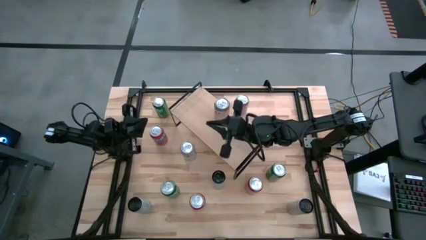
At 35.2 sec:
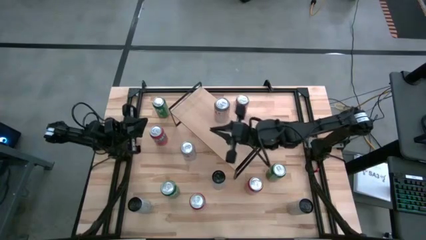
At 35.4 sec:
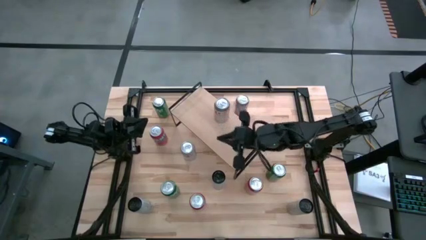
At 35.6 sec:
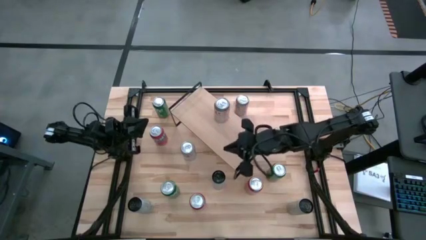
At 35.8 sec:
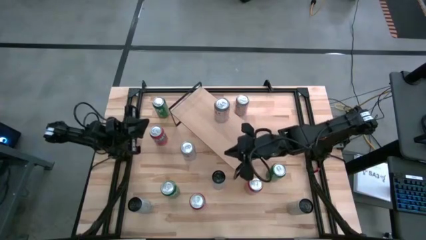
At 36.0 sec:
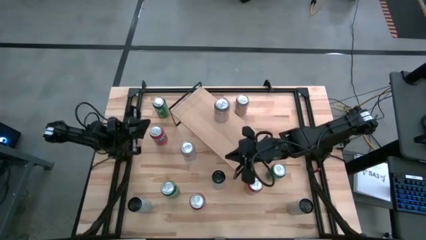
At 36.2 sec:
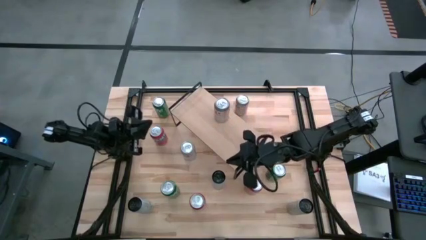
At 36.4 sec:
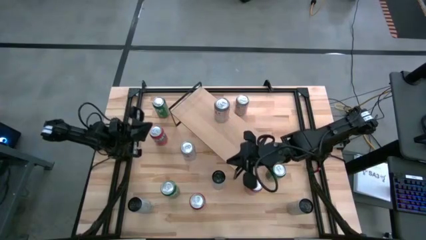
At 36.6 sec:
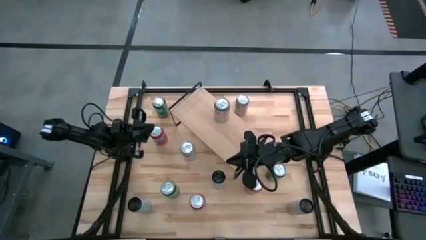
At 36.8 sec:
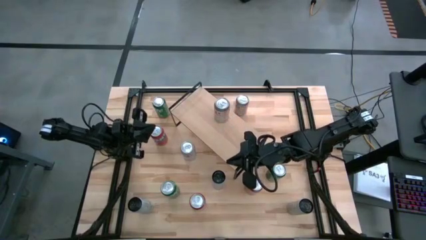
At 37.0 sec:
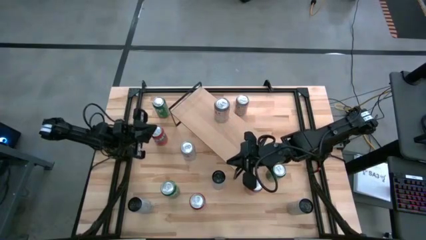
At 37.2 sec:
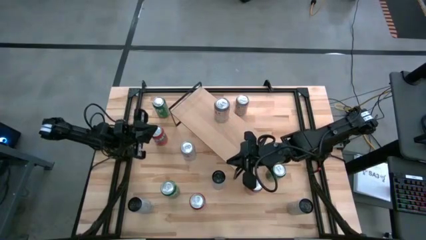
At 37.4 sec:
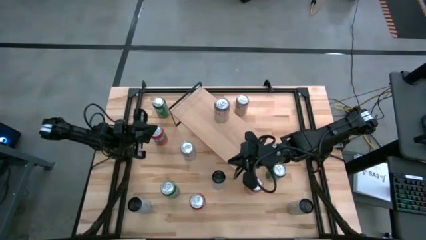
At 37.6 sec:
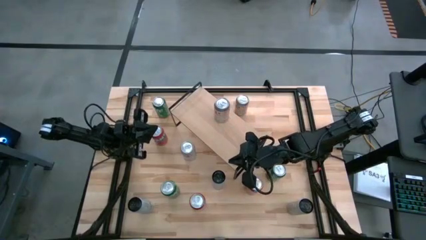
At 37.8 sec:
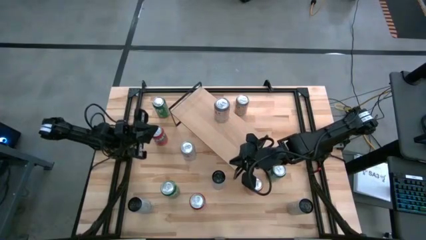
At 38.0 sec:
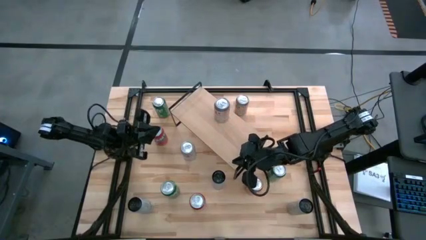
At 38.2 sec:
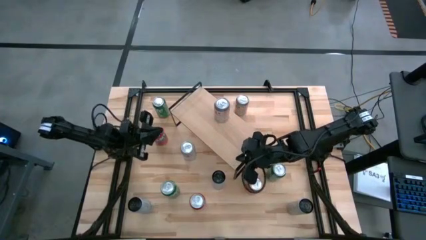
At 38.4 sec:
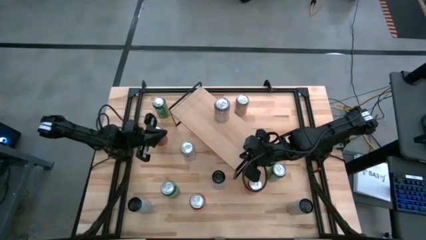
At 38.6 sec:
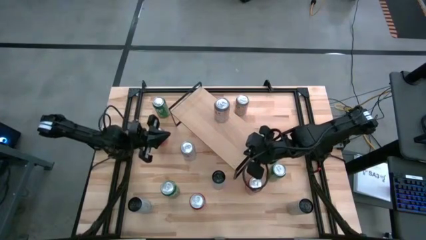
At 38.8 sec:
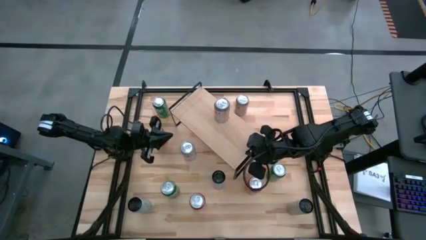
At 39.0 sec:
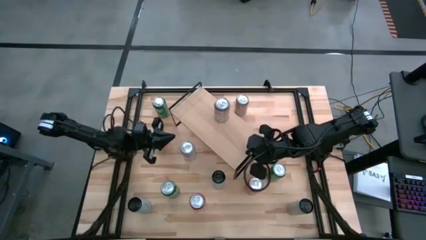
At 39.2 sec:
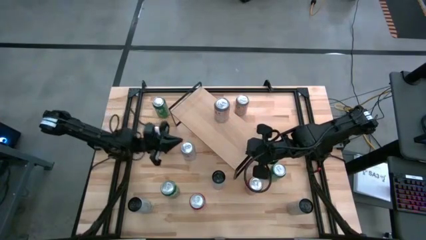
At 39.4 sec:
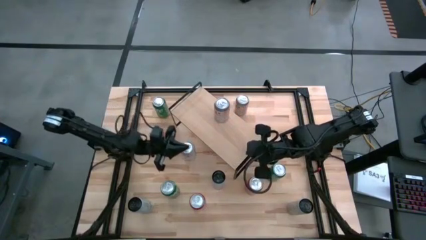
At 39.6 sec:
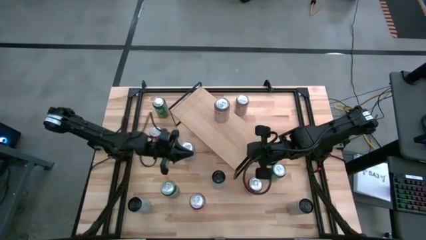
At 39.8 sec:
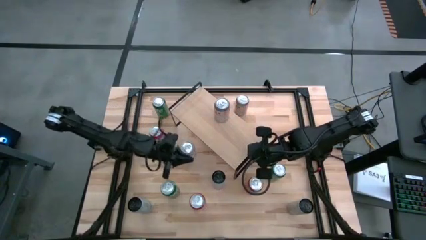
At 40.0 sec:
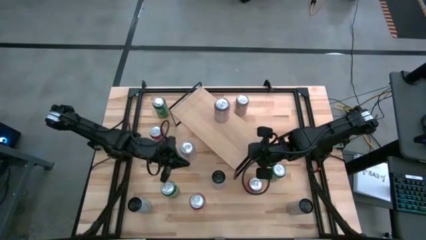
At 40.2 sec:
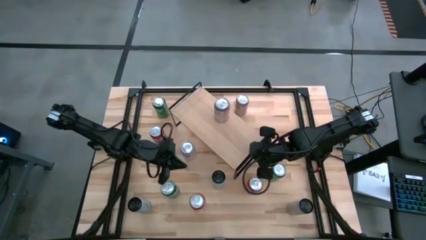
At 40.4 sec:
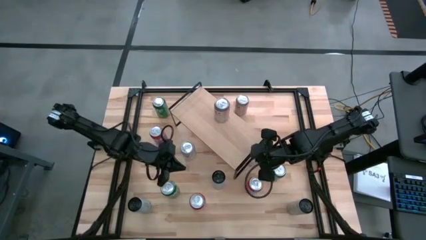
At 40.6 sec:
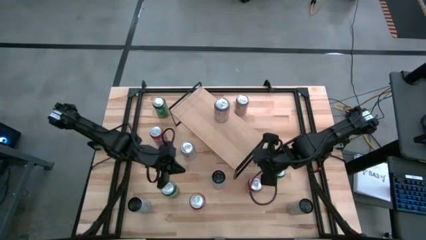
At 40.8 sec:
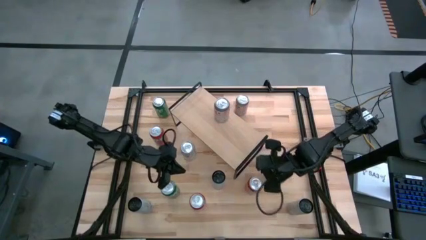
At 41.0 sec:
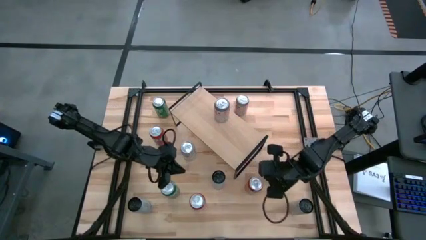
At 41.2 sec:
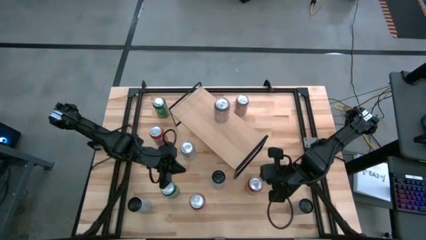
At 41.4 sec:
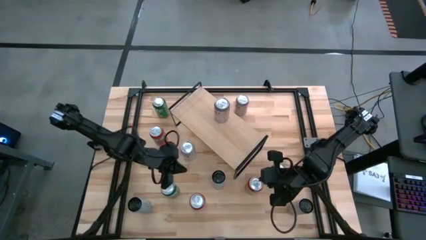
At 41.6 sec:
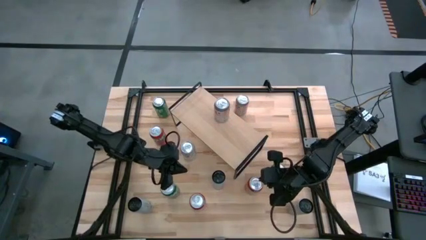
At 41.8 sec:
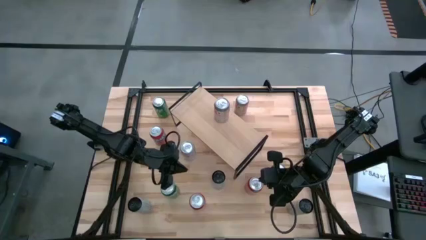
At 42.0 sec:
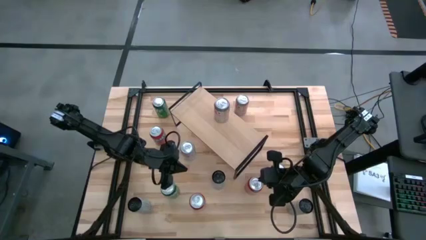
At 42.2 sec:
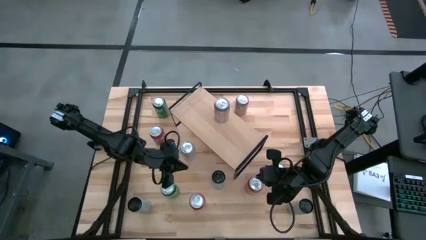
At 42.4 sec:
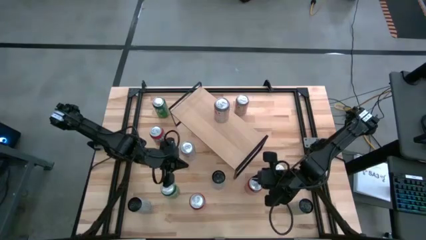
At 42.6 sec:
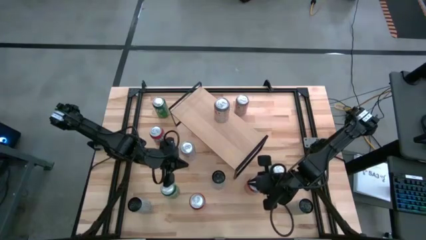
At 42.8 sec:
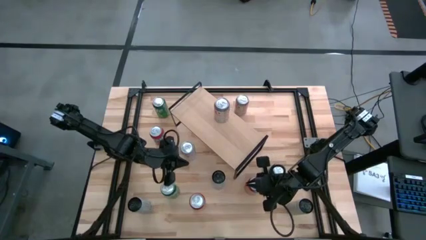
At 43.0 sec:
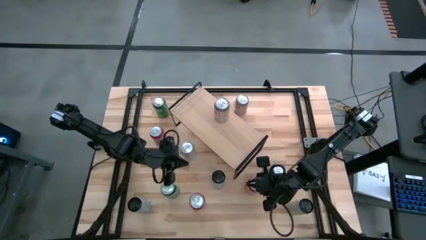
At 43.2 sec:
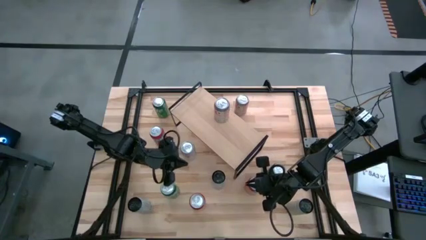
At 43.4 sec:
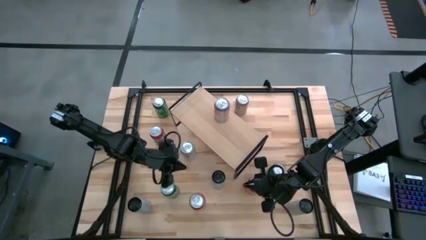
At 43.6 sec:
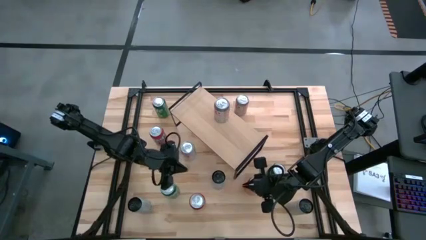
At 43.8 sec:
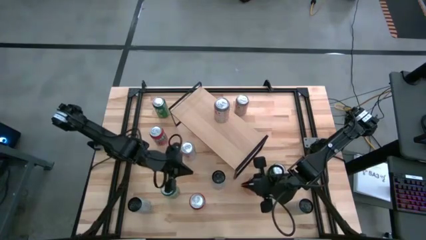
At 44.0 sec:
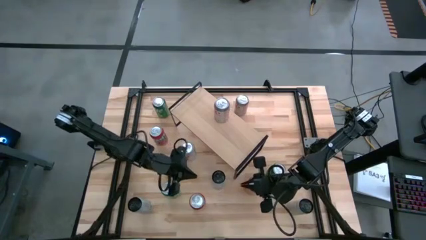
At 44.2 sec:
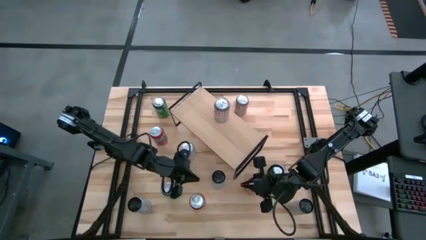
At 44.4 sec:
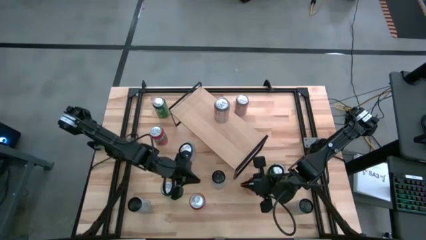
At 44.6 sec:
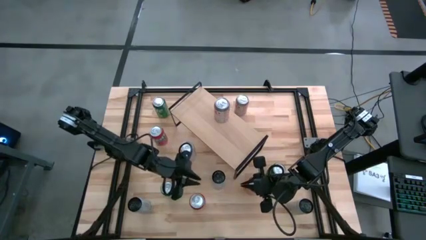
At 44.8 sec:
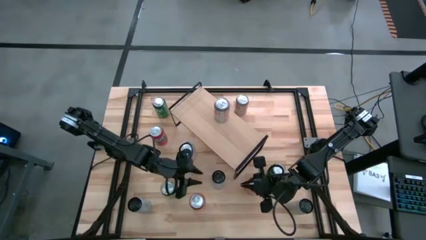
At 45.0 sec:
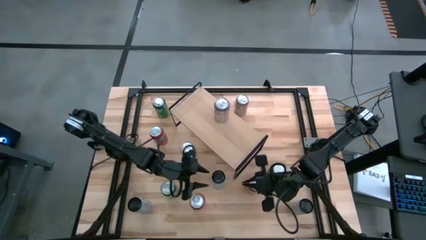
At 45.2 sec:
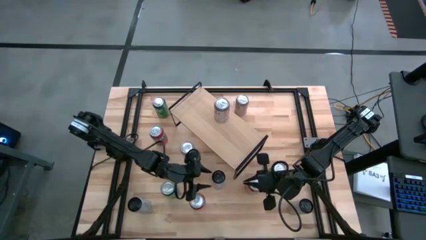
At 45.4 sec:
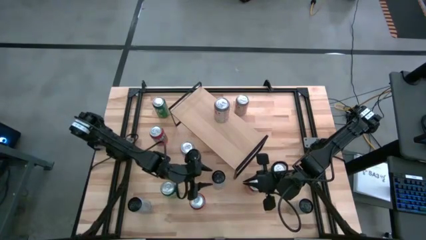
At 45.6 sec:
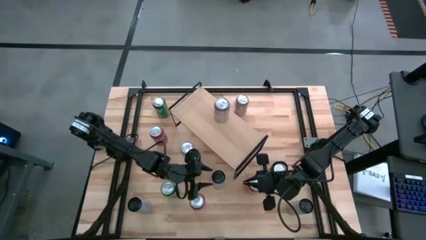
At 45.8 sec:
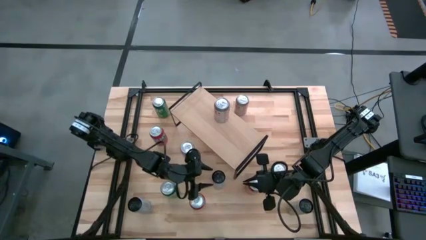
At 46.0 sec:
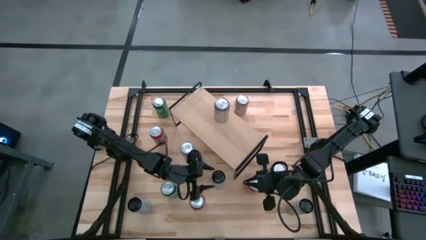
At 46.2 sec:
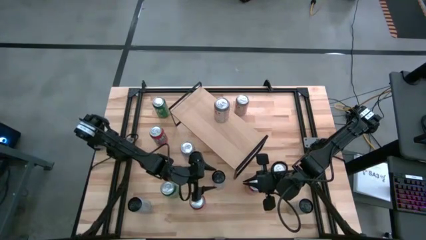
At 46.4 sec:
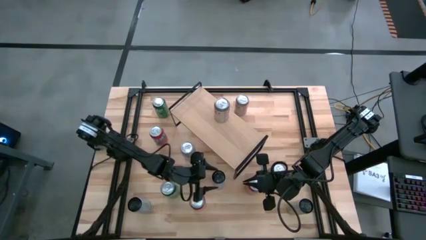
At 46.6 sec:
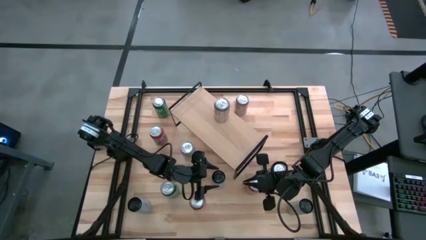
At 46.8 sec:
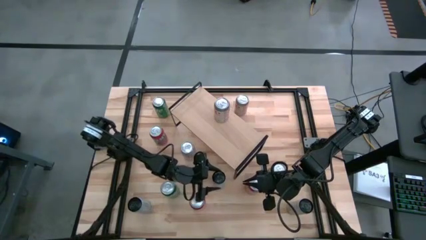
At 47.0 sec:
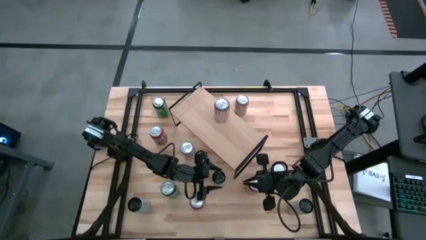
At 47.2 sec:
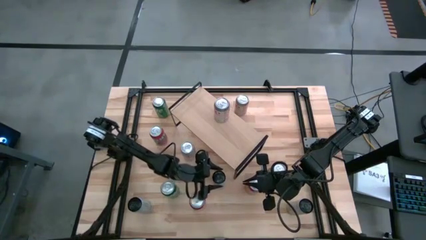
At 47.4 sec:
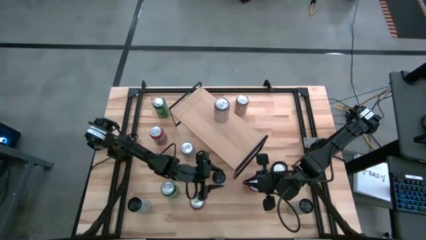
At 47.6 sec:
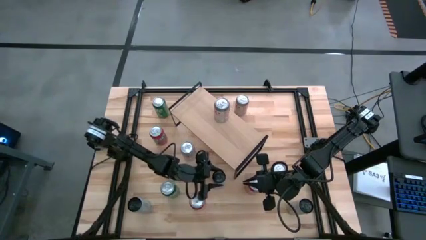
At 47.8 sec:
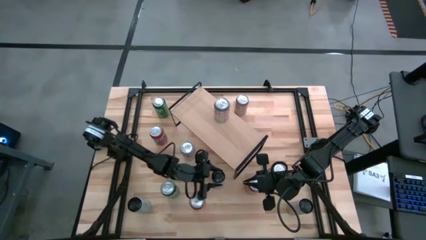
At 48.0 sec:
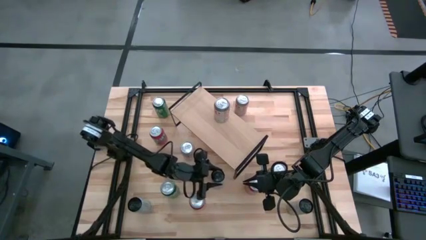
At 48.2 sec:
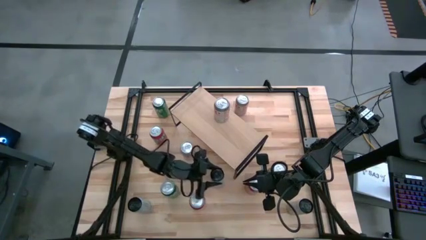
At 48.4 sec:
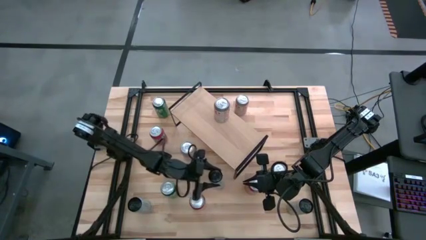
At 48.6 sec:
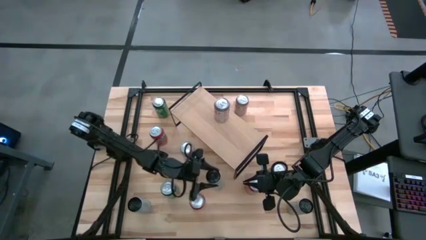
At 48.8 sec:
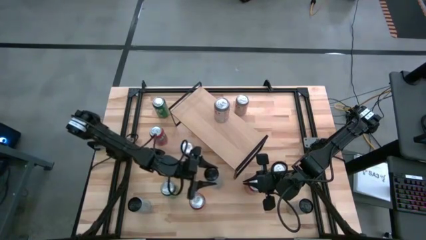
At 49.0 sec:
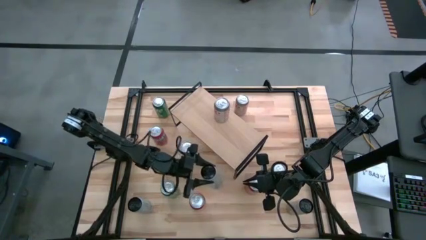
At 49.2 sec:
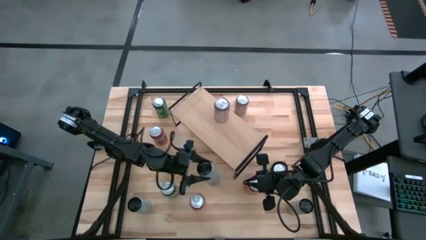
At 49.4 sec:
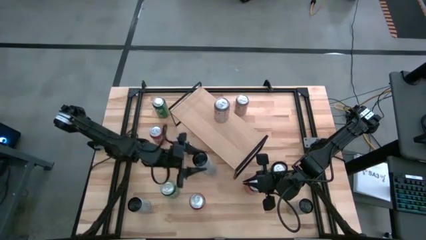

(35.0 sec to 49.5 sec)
Task: Place canned beverage on shelf
Put the top blue soda can on the shelf
